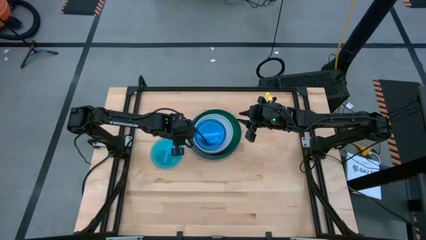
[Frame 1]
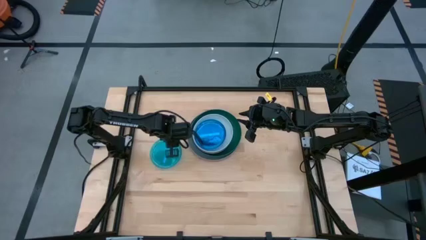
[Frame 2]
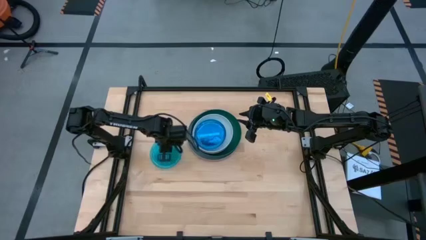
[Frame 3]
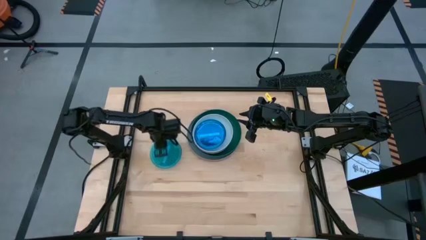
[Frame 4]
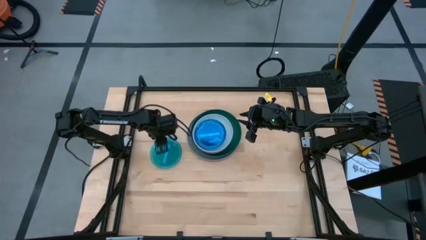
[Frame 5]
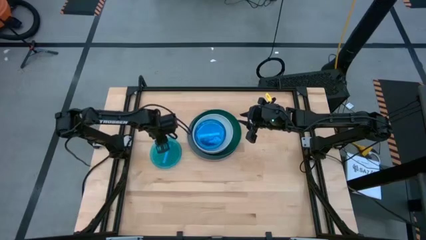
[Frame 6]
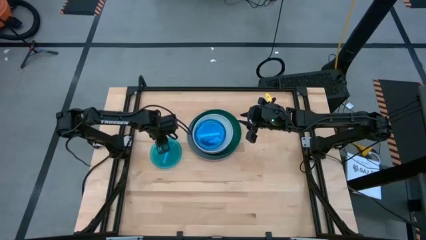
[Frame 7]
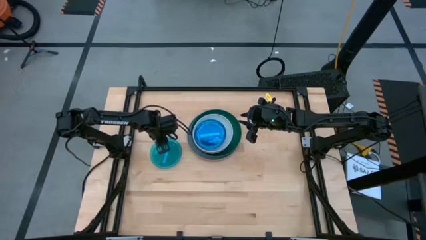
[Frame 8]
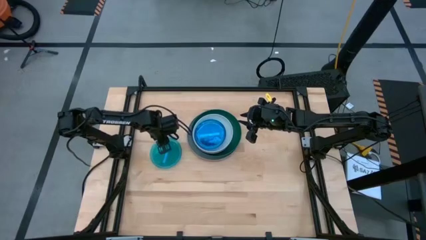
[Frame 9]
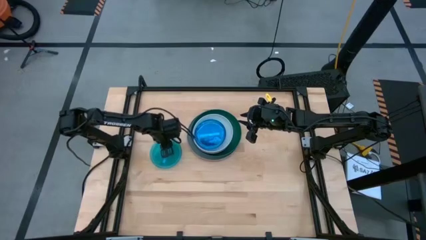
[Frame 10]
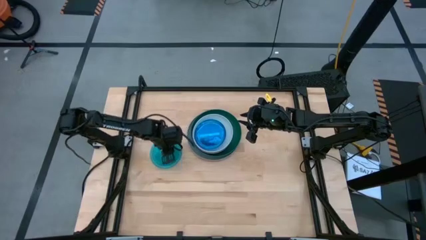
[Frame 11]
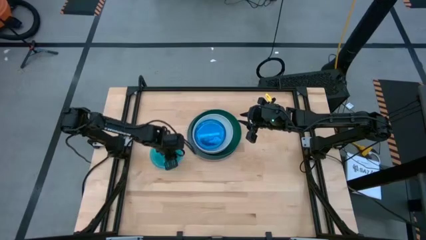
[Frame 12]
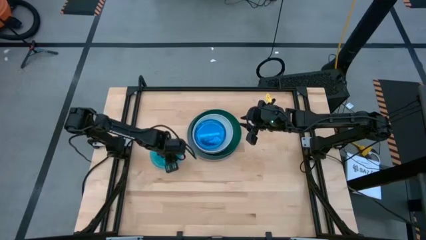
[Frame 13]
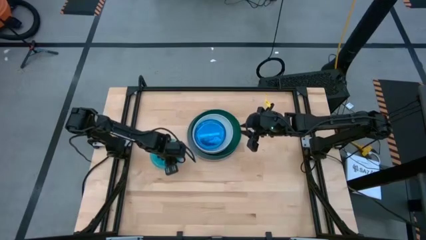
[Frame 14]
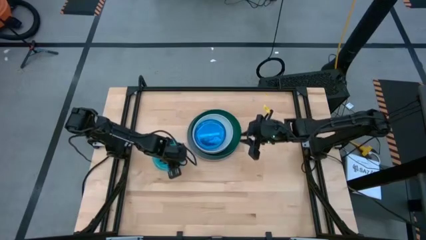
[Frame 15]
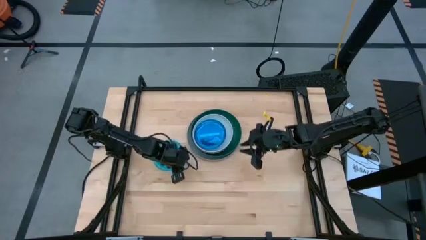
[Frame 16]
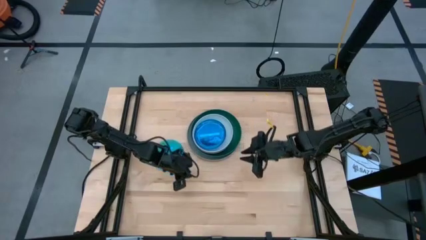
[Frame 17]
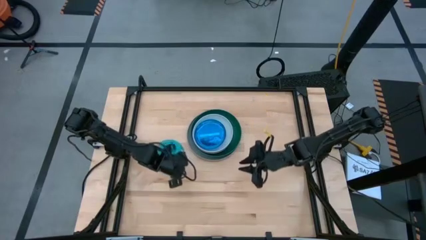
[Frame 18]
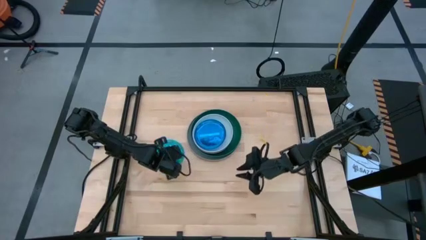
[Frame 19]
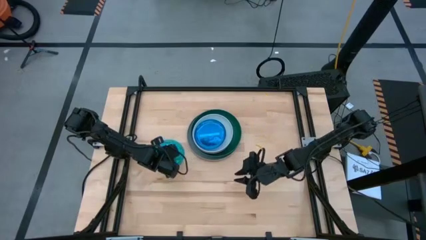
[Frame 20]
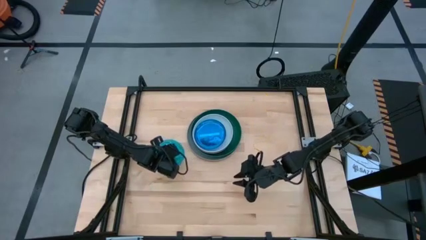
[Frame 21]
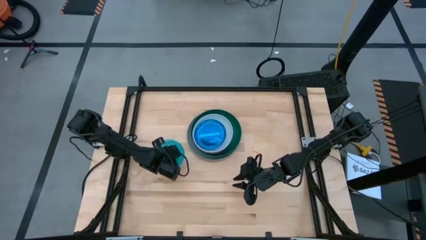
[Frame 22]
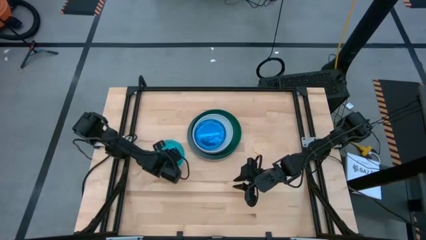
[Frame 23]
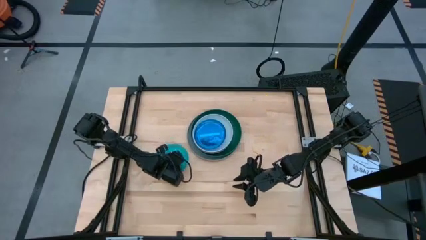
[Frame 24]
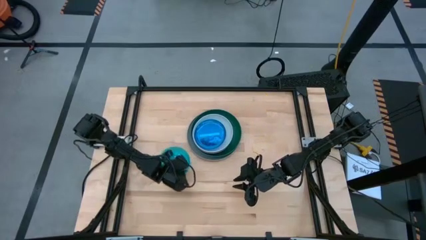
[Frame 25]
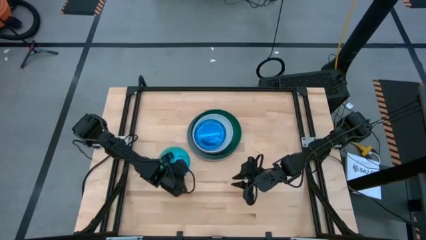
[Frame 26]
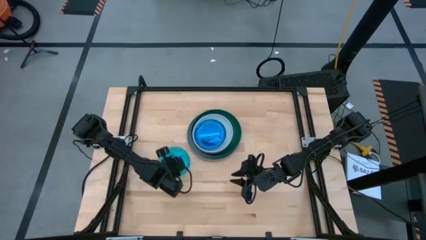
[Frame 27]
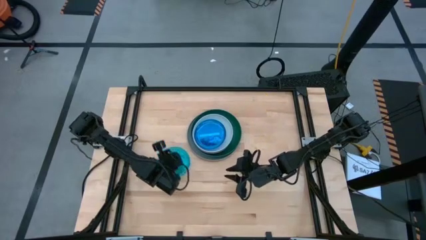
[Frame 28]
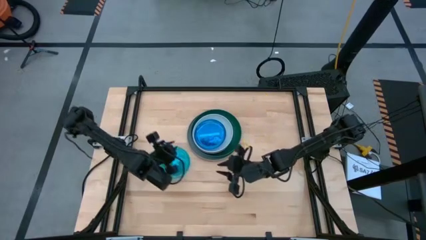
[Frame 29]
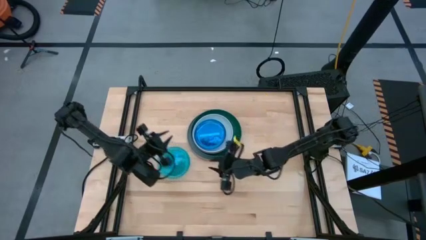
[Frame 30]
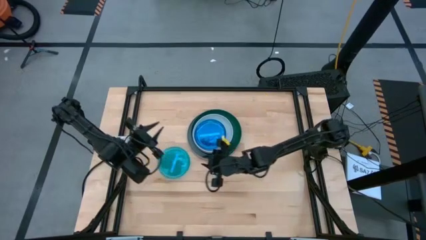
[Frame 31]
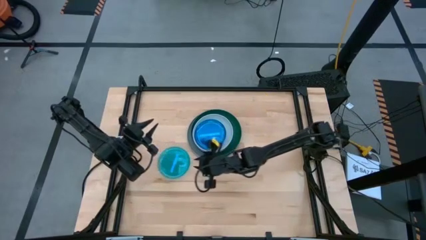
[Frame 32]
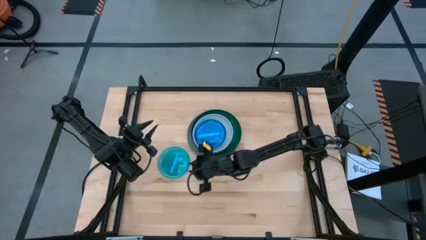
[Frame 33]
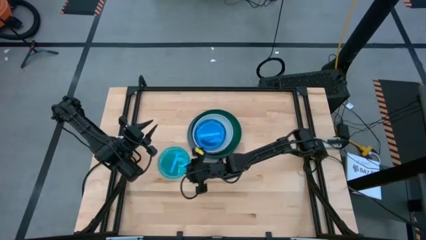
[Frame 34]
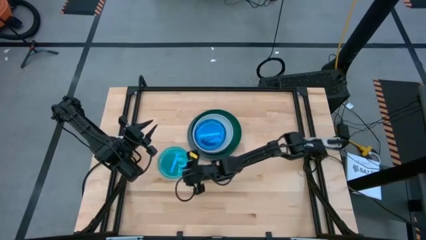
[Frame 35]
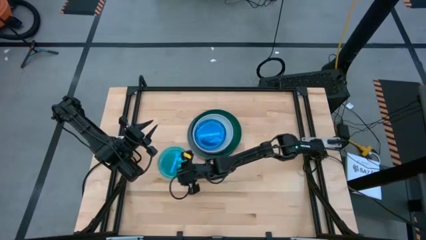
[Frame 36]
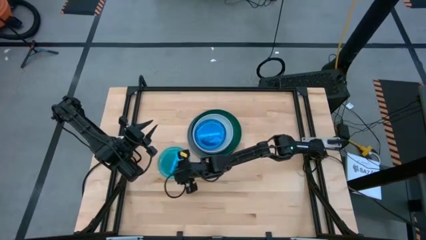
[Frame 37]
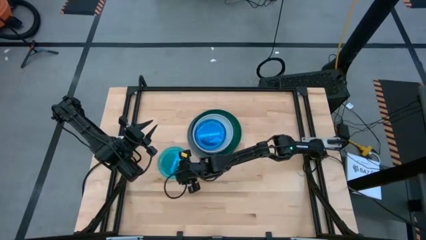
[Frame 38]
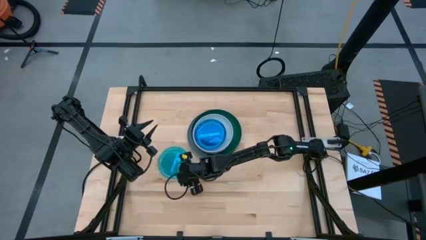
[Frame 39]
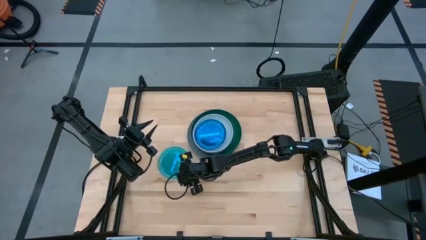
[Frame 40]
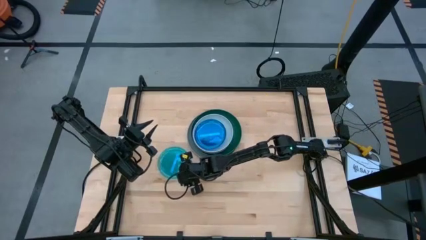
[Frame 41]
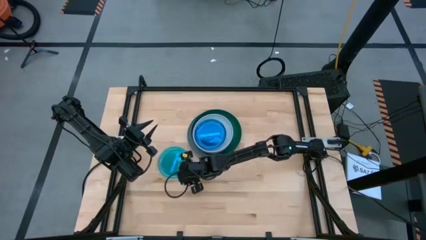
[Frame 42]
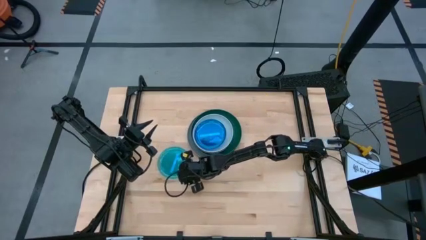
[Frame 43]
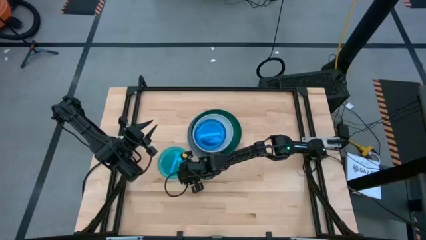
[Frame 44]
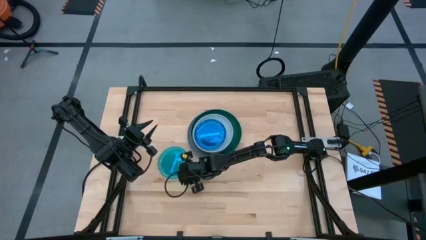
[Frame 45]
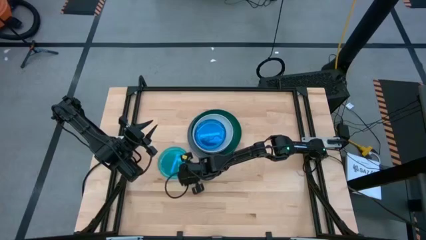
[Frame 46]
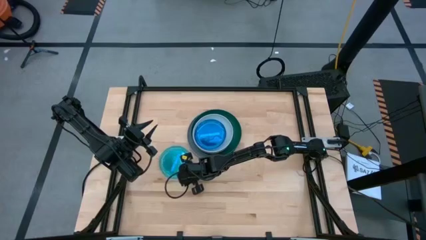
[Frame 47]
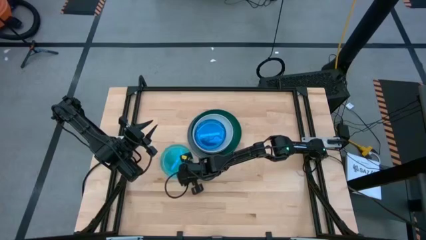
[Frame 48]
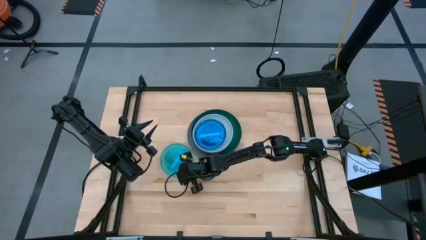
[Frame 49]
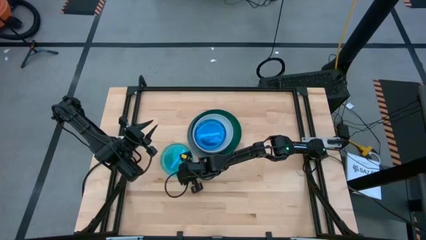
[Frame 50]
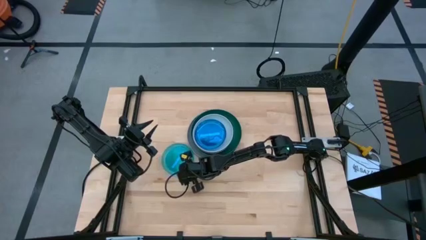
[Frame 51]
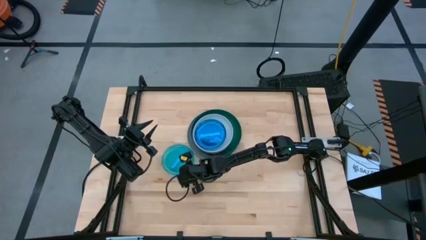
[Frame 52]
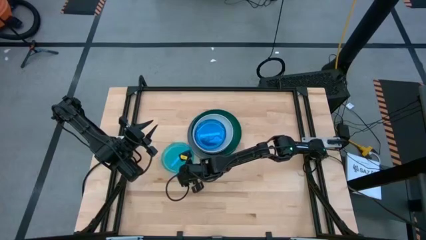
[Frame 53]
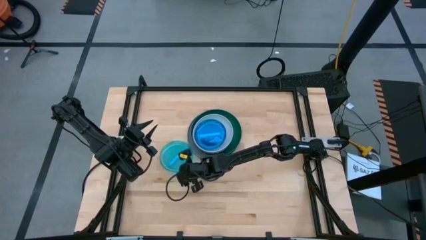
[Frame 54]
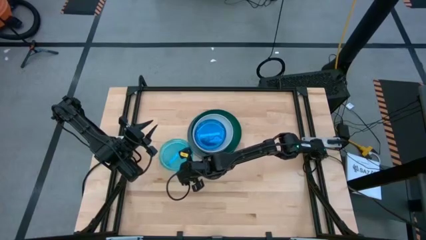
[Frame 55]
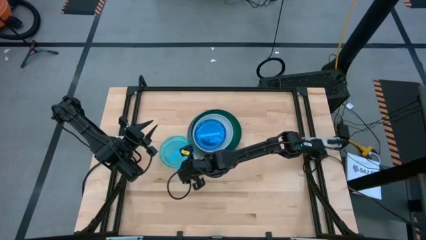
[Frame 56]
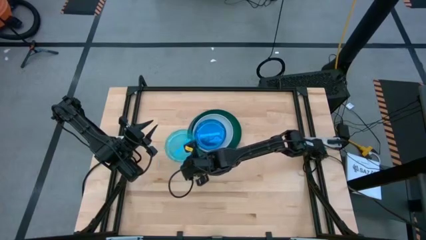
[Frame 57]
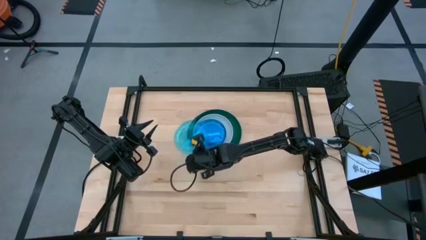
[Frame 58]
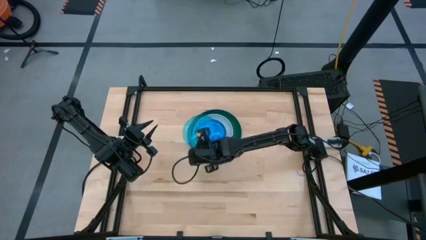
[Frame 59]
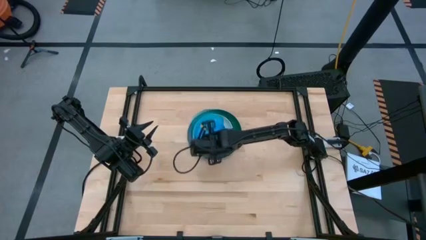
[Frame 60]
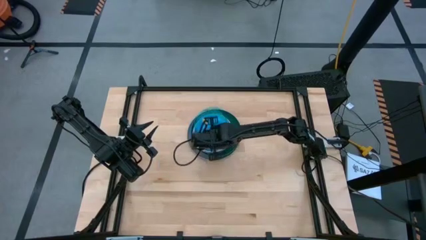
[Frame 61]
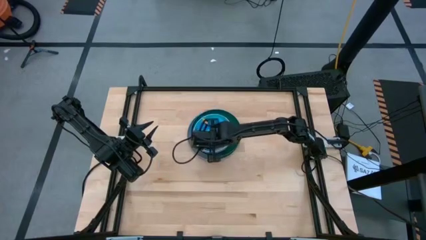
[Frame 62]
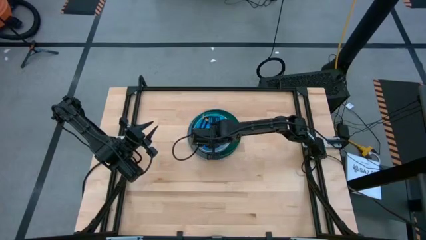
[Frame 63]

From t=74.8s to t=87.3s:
Task: Stack plastic plates
Stack the blue transparent plate on top of the blue transparent plate

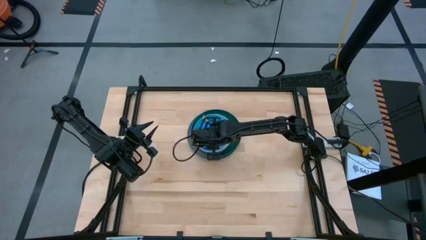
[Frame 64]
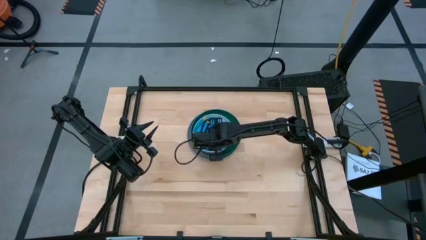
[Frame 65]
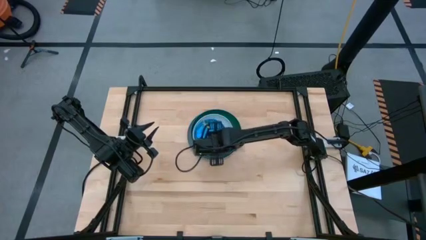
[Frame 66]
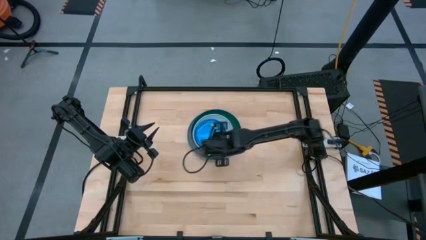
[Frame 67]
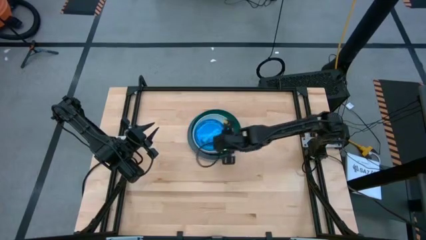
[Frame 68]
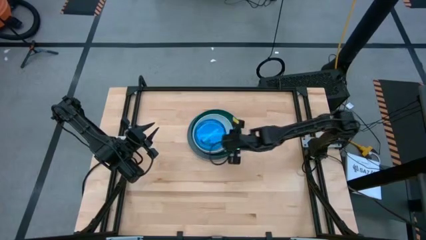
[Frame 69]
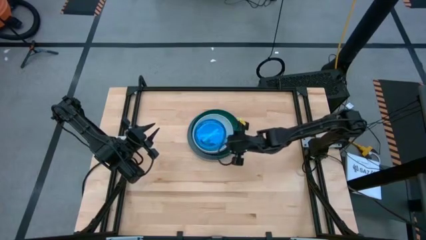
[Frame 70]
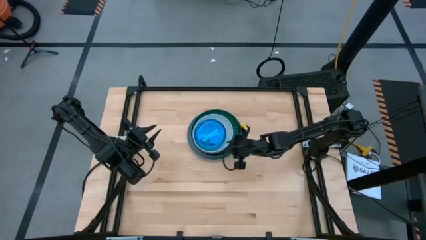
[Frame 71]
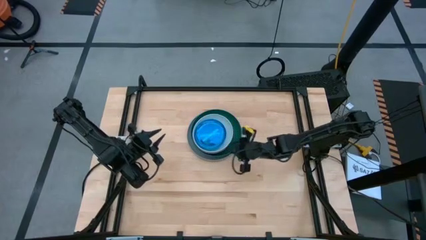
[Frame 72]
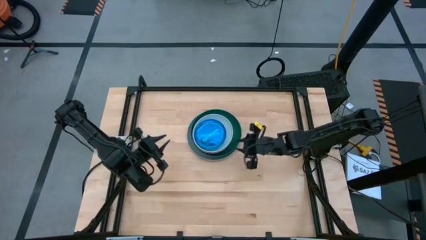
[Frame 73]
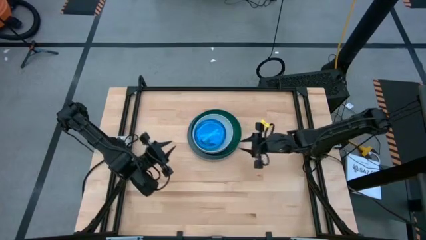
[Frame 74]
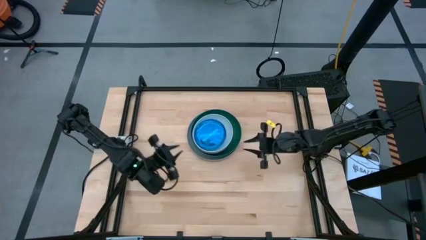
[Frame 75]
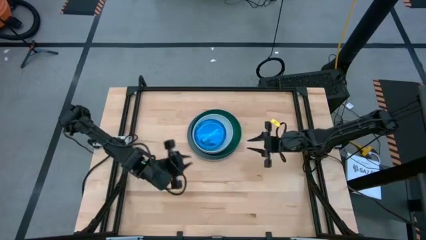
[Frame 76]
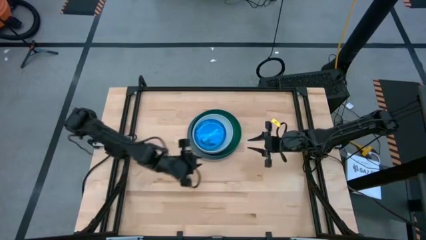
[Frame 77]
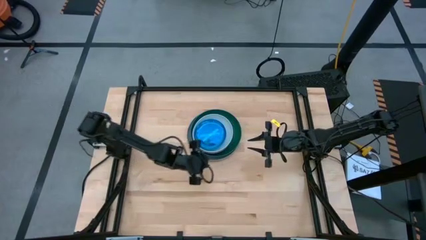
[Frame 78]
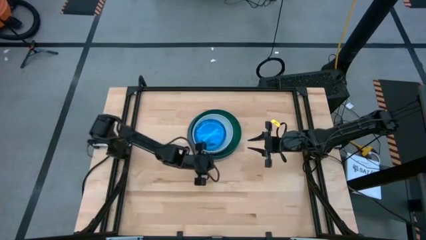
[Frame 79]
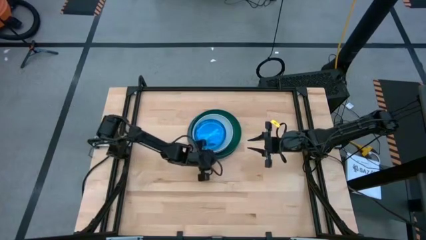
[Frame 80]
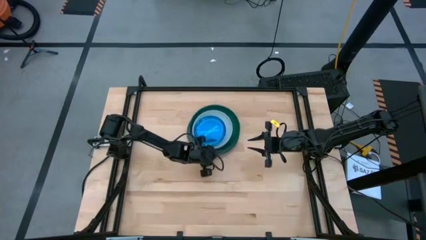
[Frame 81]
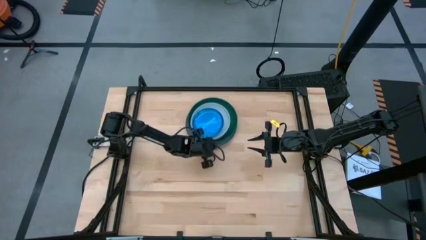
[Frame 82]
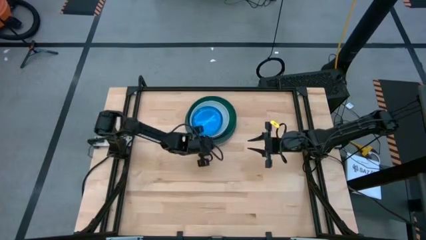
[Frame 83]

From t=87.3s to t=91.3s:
Adjust the plates
